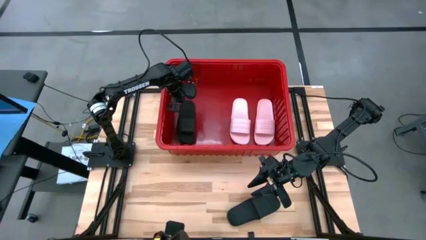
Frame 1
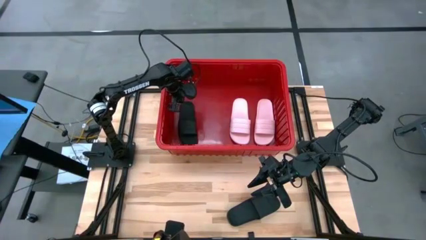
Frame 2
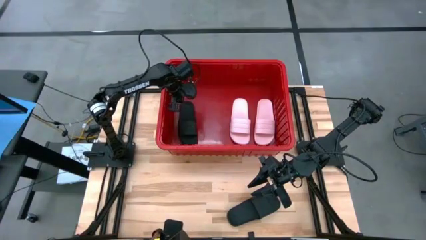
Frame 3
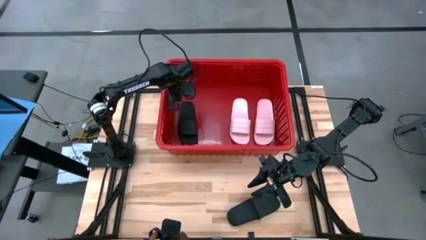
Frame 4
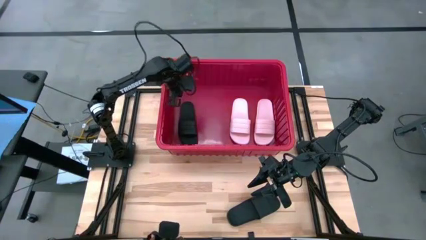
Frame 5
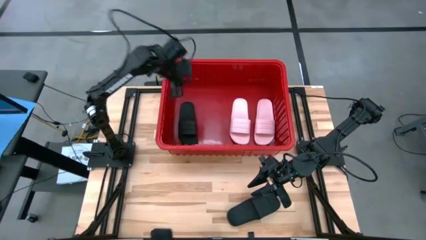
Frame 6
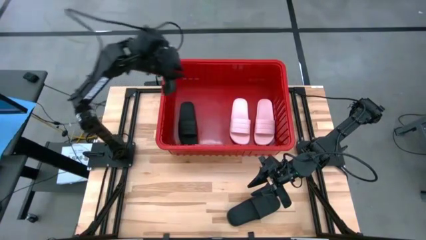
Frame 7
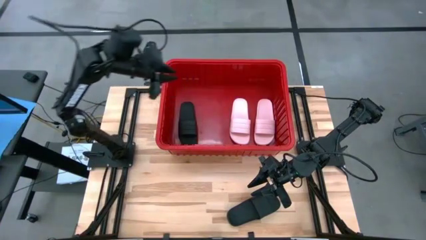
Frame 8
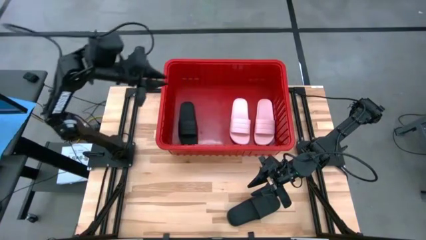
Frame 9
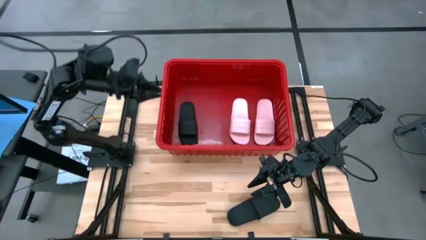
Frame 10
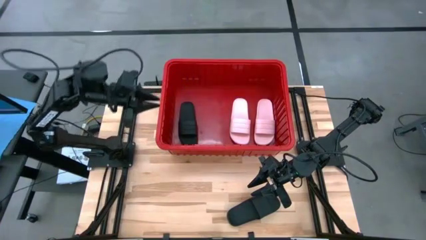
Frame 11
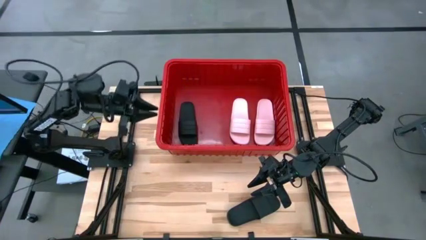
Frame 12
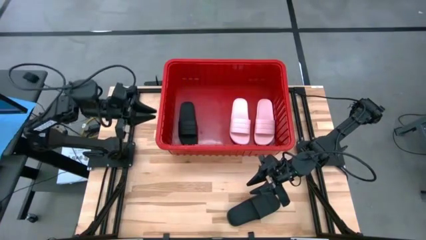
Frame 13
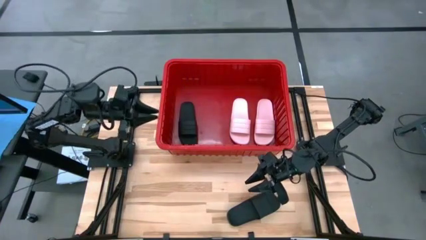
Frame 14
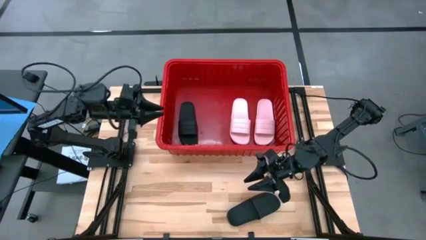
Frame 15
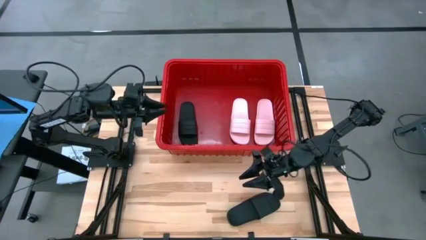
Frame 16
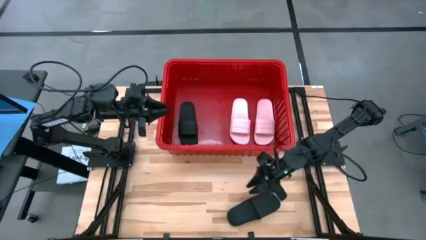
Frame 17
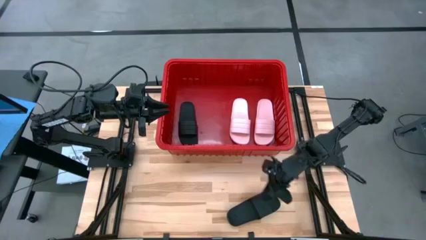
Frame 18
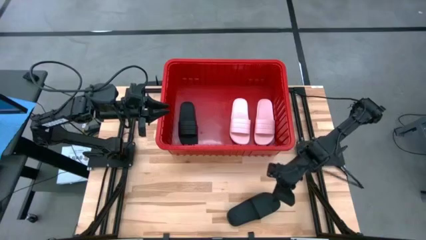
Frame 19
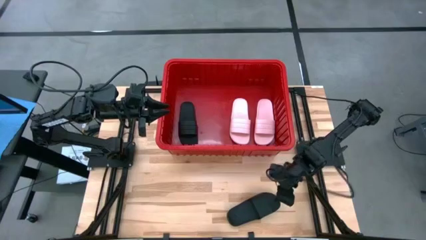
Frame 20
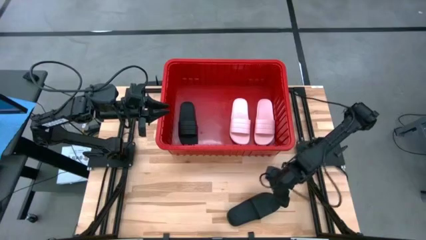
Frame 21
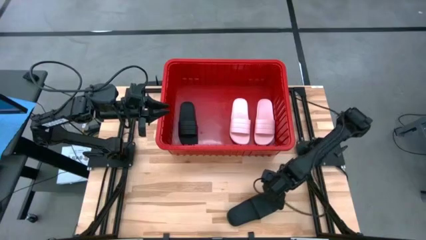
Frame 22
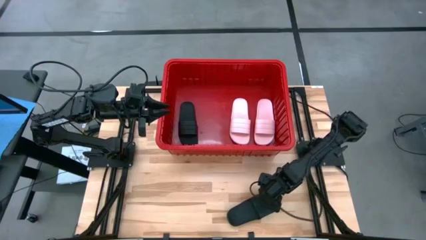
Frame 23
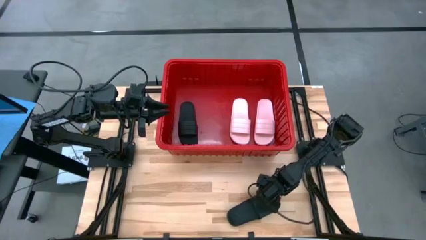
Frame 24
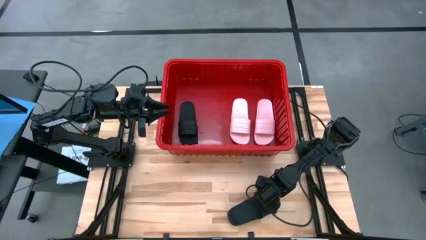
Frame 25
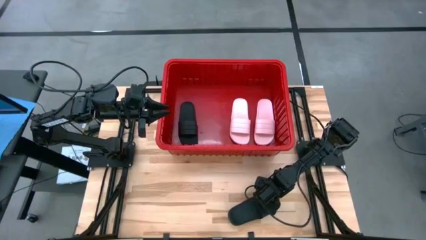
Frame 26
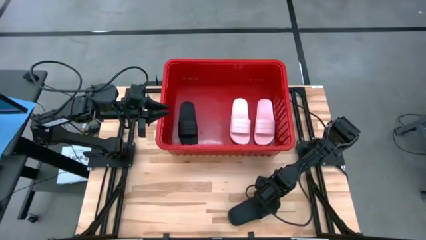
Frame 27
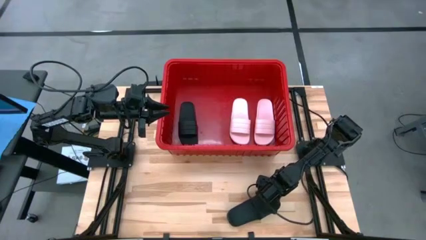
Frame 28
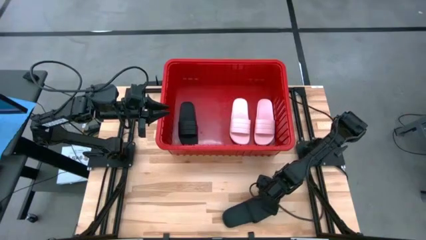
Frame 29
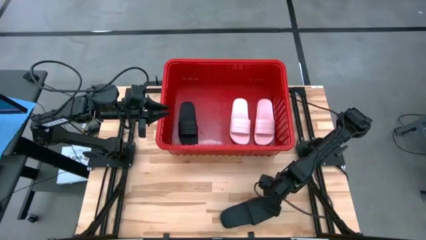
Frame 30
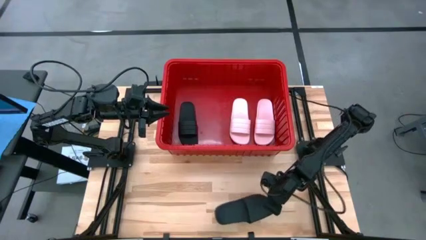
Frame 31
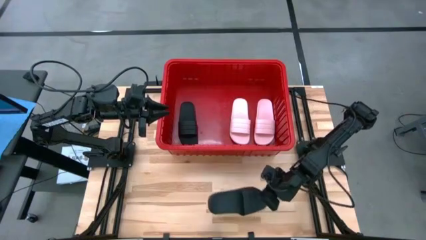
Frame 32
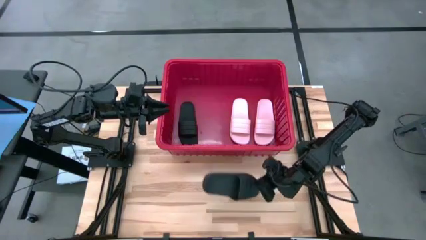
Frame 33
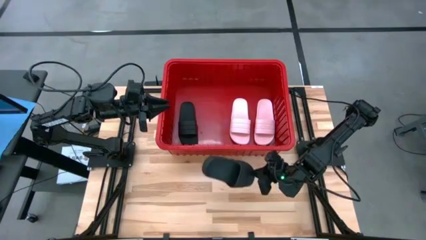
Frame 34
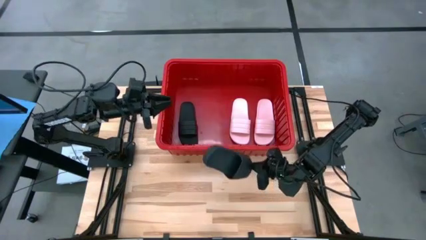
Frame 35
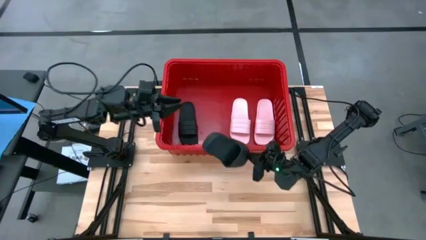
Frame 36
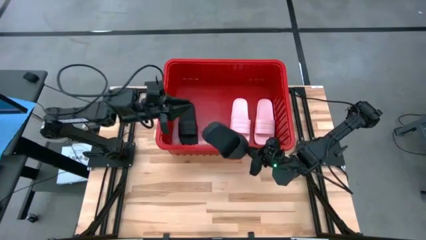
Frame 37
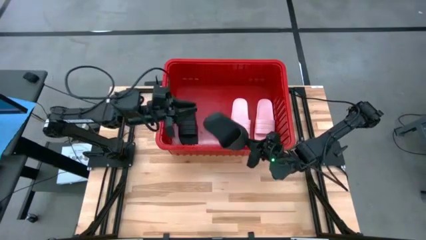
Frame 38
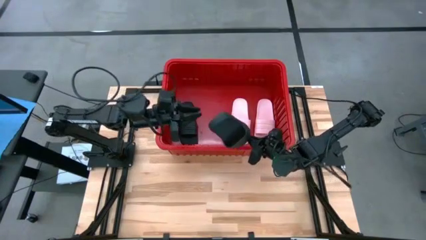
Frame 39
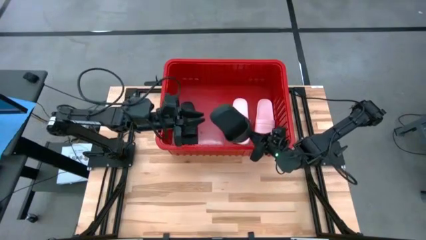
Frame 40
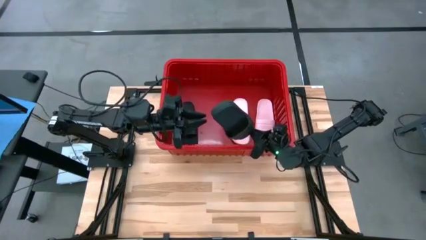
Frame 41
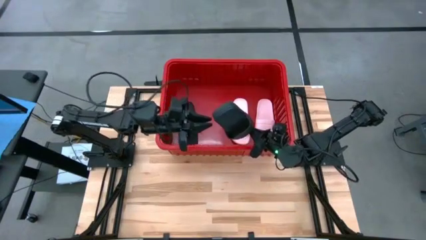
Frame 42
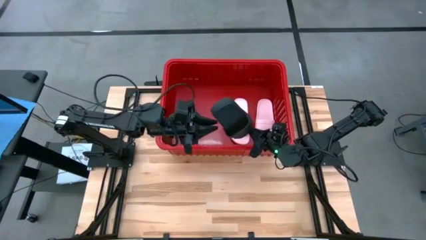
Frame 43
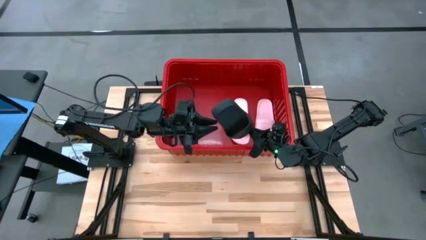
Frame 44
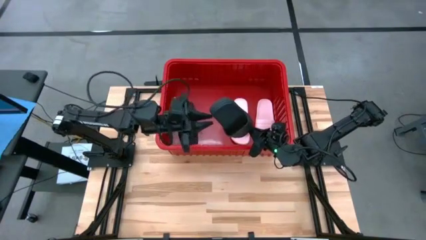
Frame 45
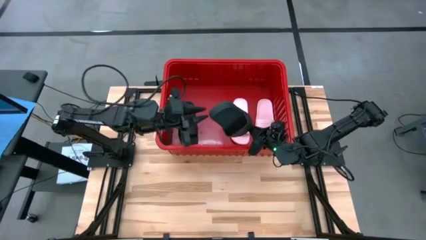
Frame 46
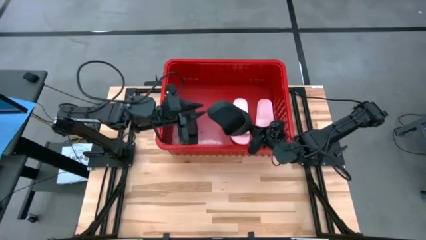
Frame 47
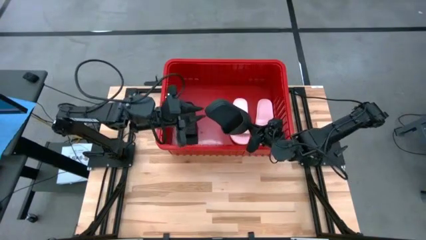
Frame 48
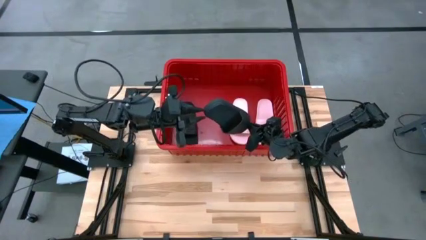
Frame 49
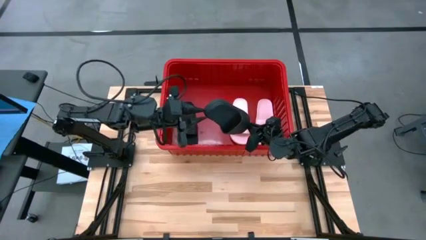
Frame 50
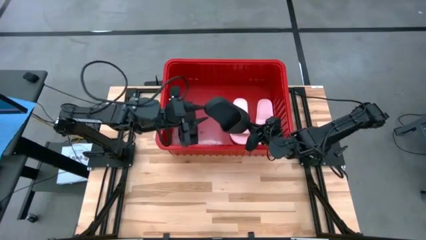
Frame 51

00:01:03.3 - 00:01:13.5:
Task: Pick and place slides into bin
Put the black slide into the bin

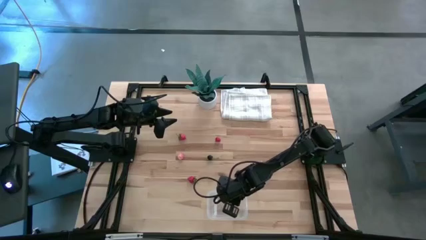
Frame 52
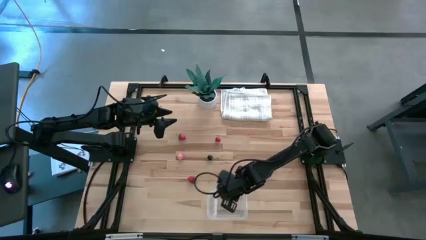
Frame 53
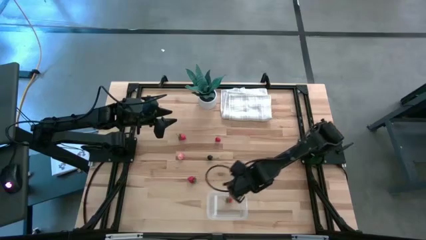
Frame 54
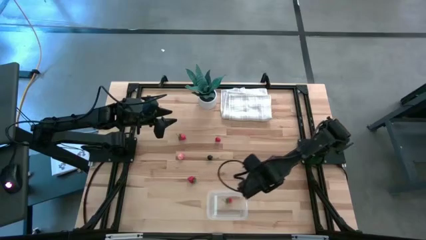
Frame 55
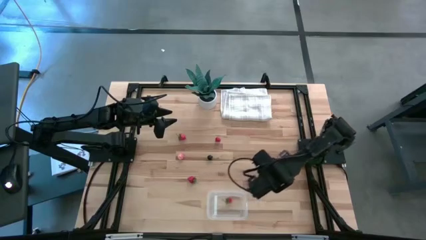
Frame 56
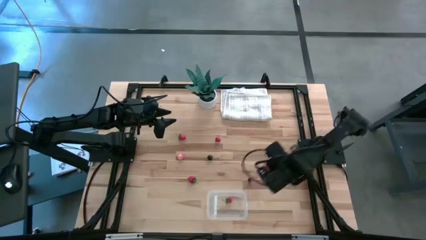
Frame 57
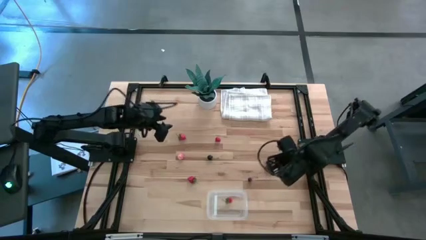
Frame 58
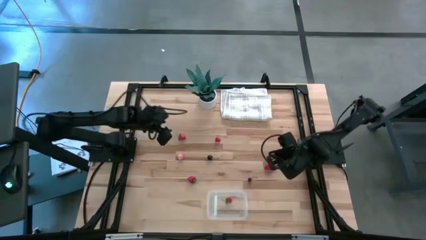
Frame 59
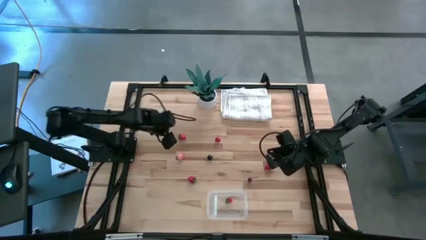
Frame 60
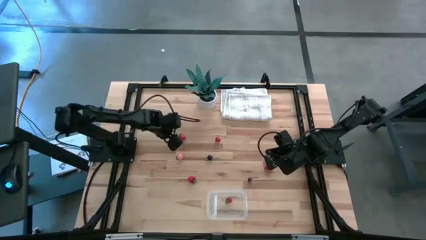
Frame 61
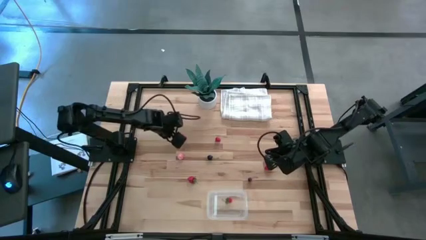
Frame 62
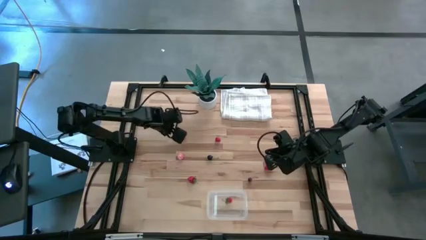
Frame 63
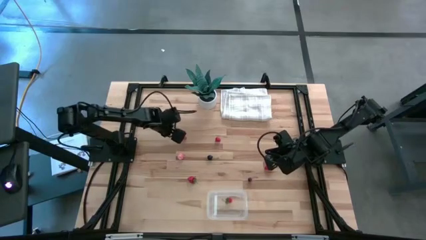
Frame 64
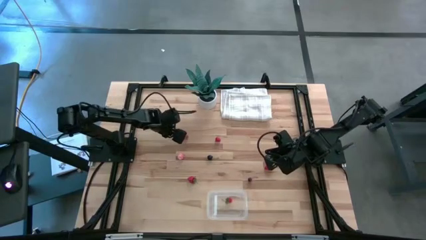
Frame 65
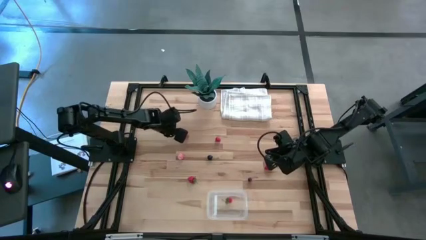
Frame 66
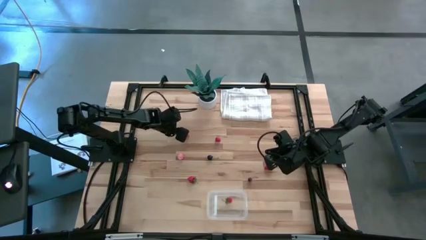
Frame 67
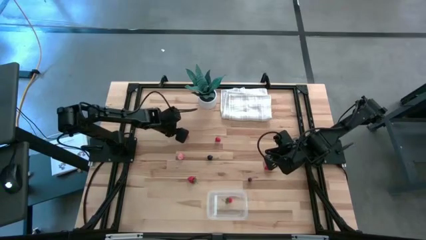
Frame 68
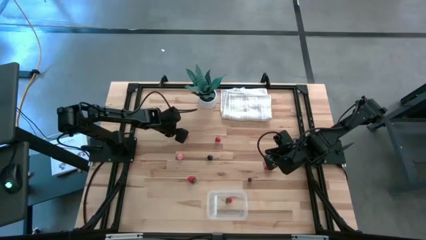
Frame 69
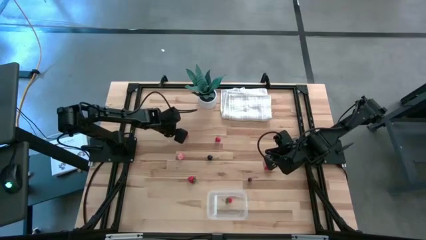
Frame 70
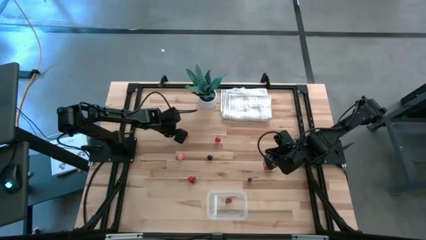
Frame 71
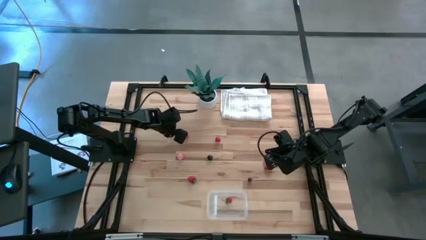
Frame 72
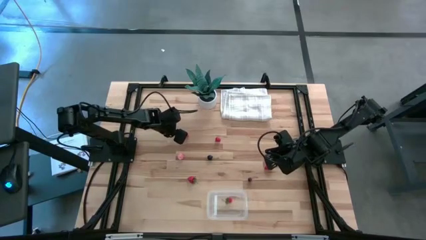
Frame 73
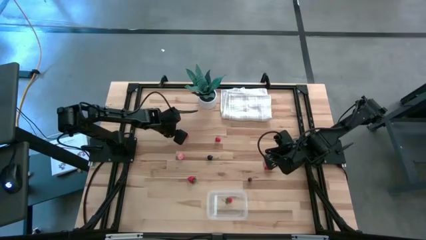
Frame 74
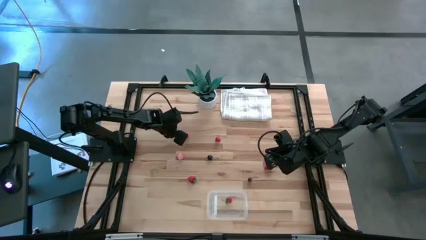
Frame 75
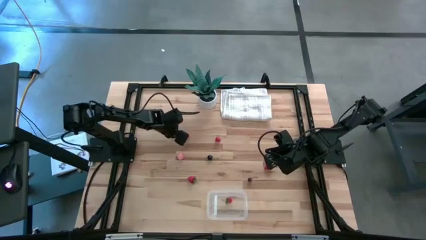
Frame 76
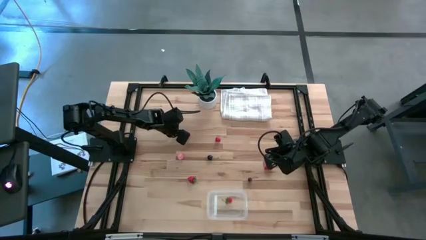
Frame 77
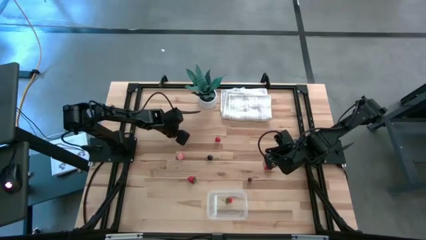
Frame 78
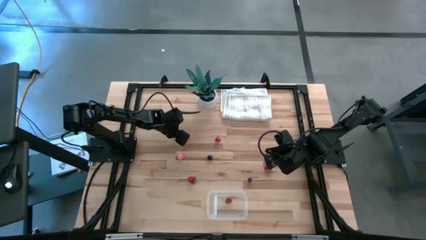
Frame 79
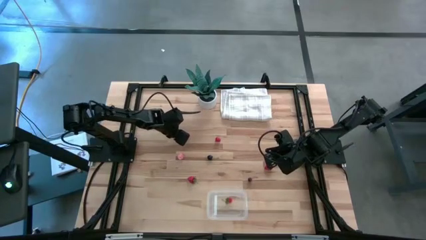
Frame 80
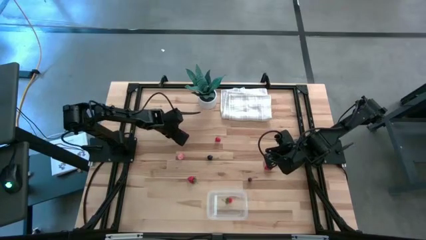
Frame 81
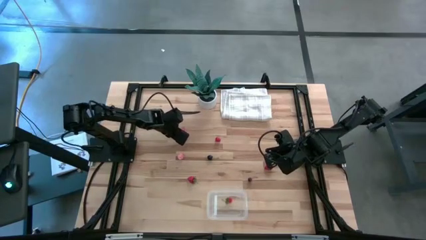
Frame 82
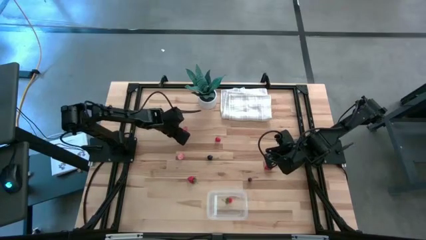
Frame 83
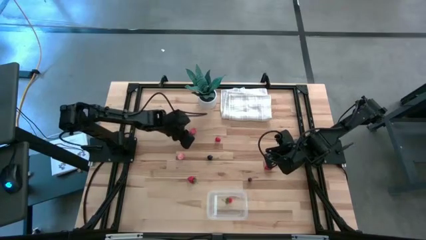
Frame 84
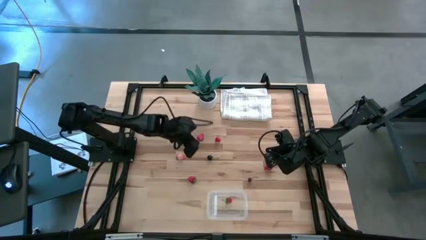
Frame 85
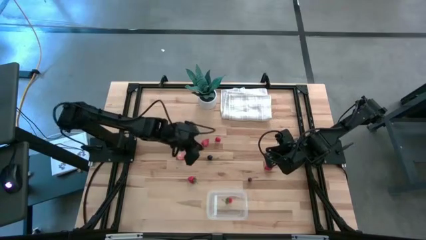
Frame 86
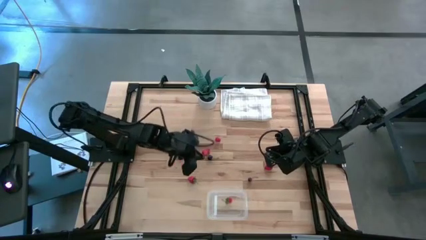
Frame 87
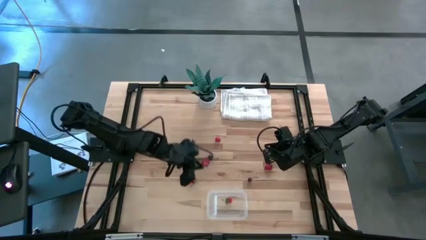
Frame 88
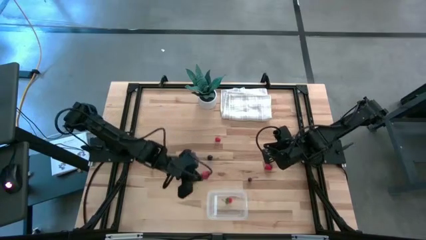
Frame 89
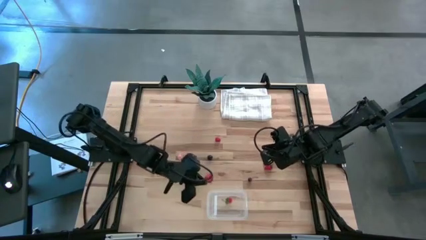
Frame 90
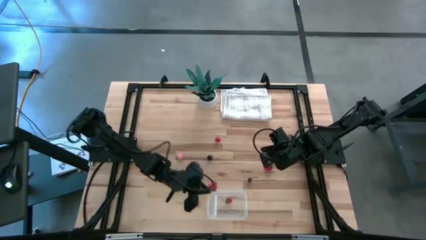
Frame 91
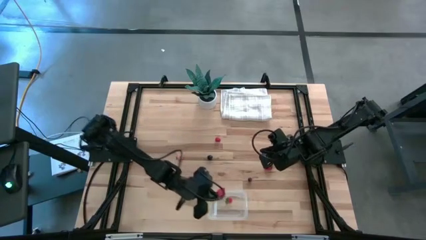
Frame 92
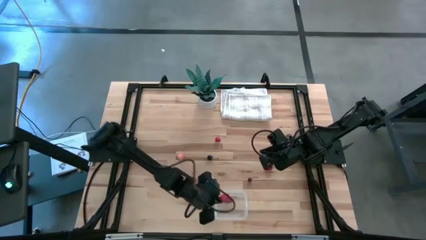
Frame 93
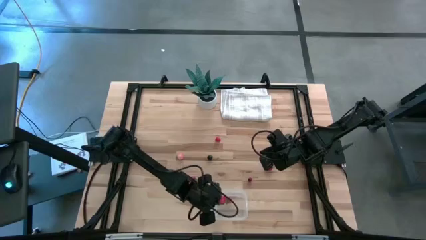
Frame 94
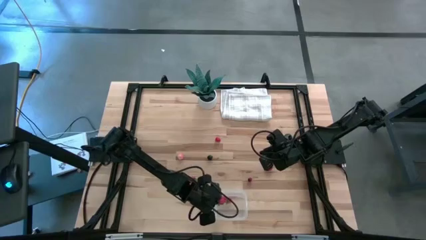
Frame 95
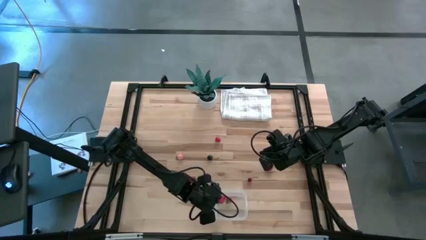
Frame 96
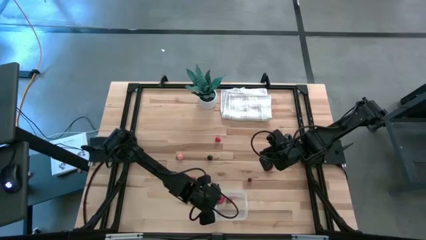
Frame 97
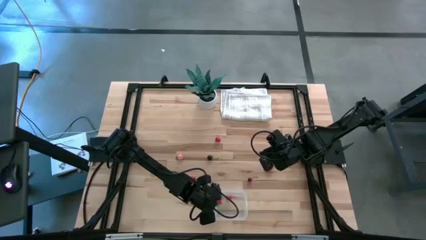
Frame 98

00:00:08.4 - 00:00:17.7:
Task: Pick and placing Produce into tupperware
Put the strawberry into the transparent bin
